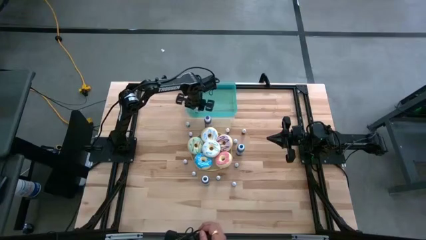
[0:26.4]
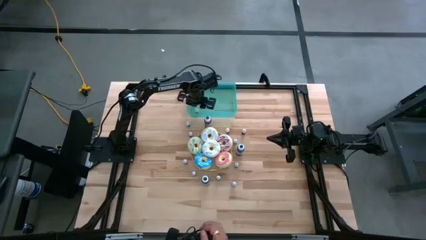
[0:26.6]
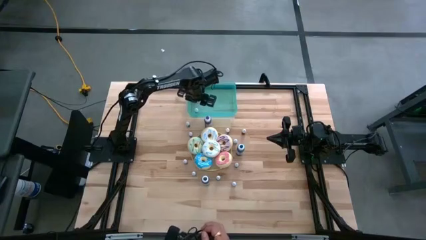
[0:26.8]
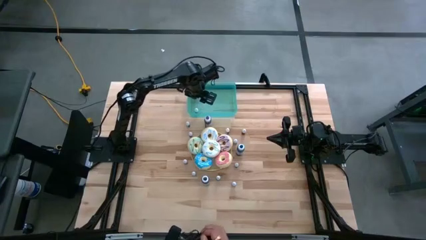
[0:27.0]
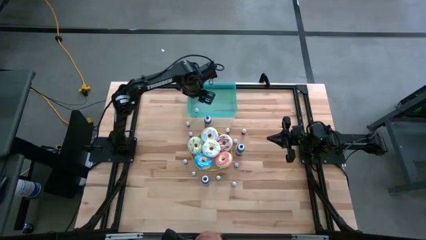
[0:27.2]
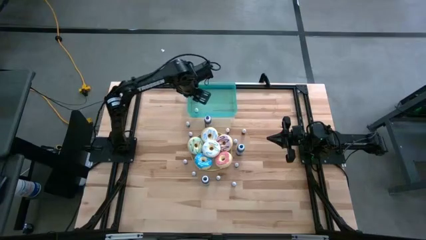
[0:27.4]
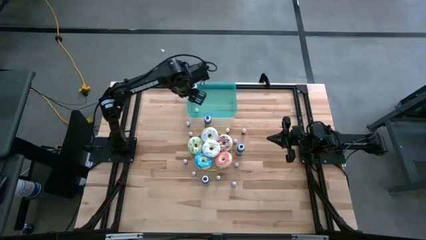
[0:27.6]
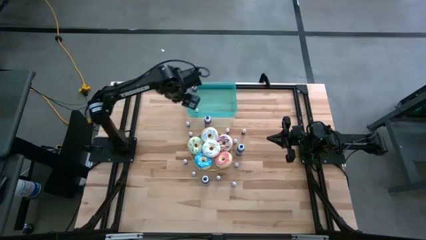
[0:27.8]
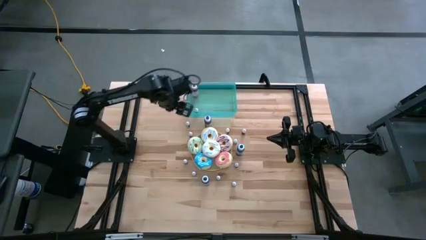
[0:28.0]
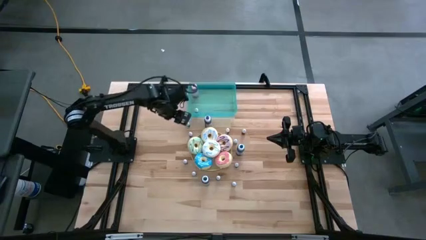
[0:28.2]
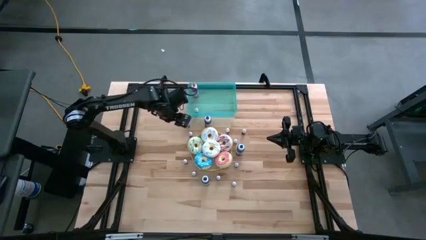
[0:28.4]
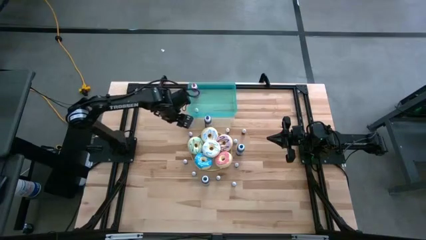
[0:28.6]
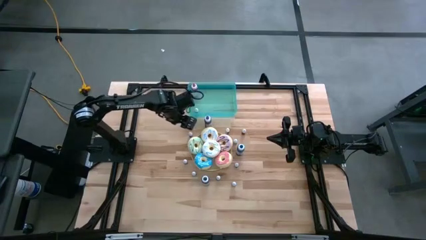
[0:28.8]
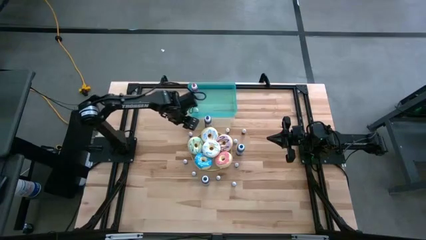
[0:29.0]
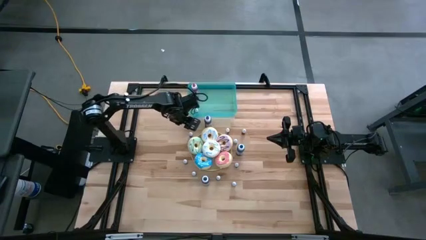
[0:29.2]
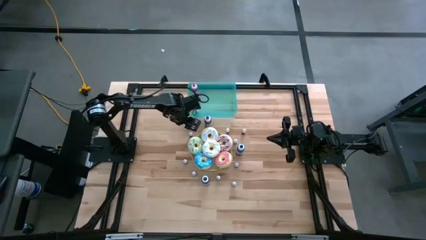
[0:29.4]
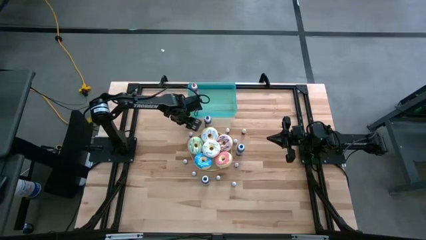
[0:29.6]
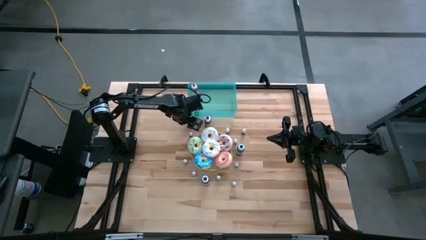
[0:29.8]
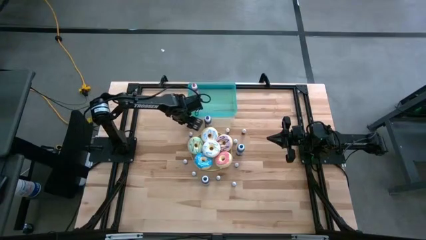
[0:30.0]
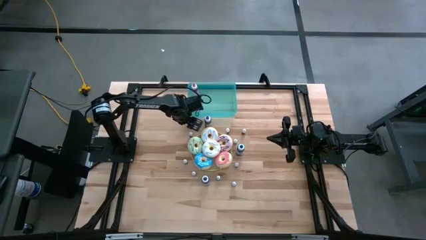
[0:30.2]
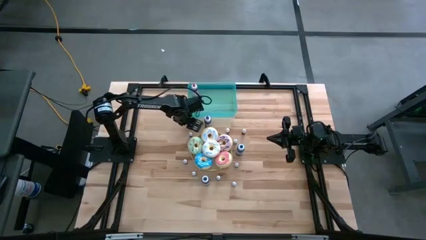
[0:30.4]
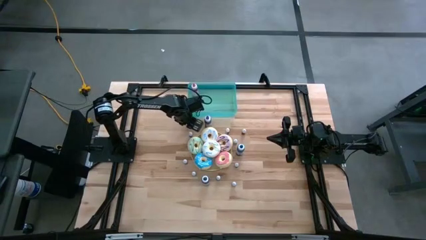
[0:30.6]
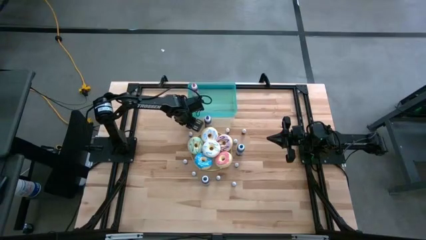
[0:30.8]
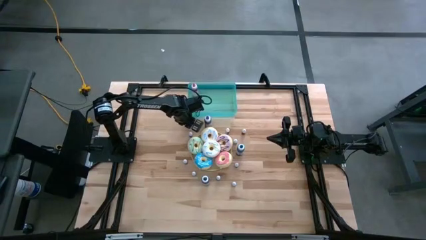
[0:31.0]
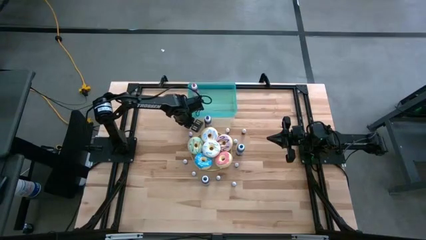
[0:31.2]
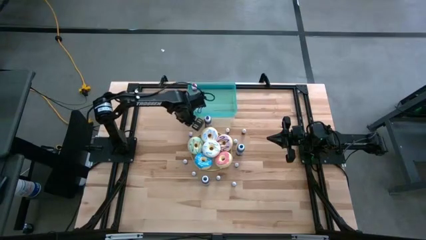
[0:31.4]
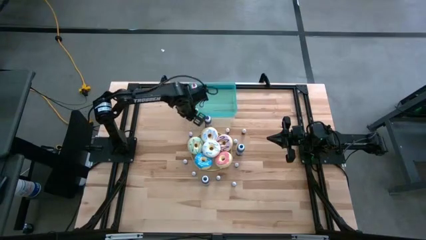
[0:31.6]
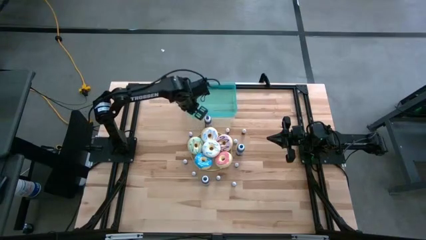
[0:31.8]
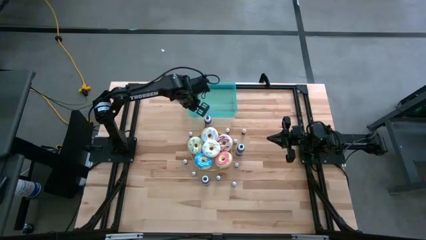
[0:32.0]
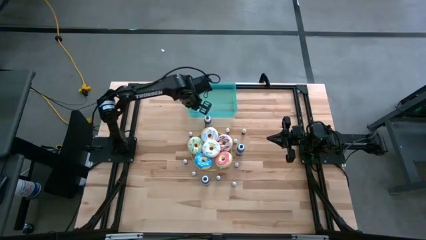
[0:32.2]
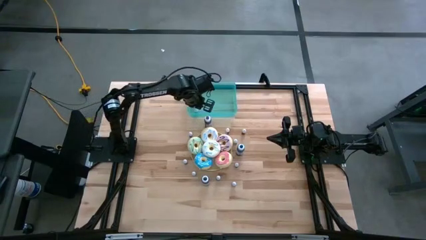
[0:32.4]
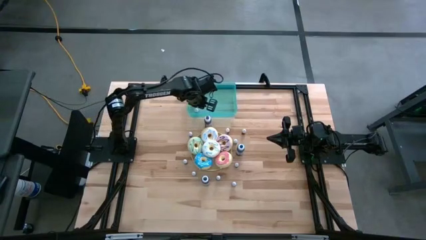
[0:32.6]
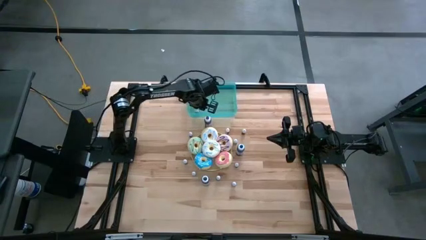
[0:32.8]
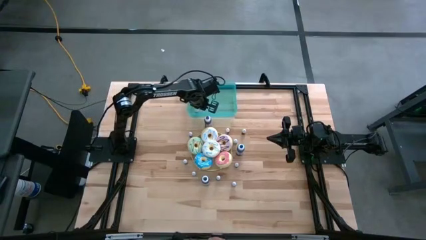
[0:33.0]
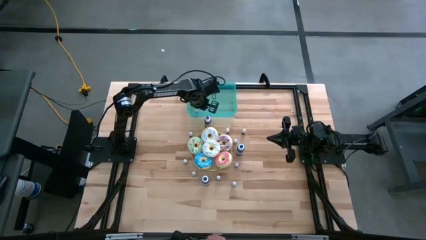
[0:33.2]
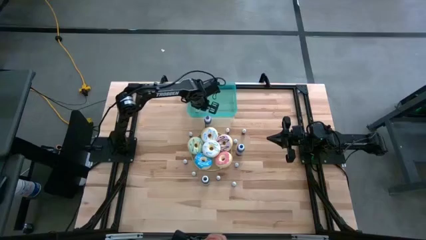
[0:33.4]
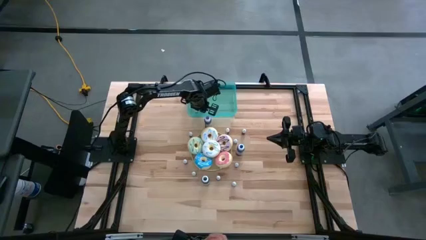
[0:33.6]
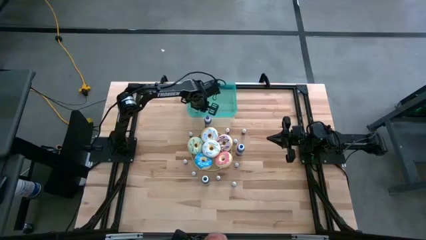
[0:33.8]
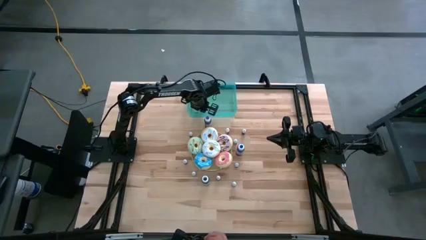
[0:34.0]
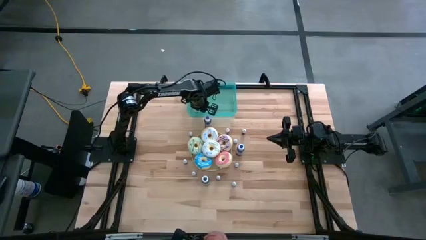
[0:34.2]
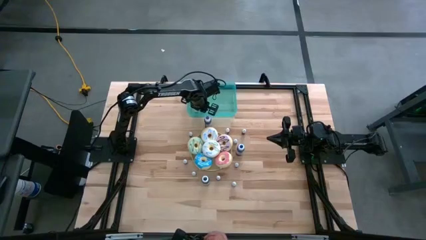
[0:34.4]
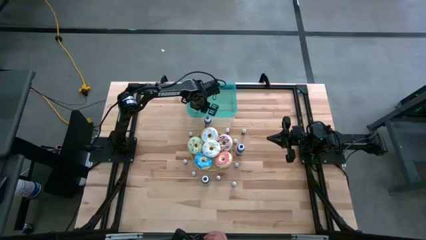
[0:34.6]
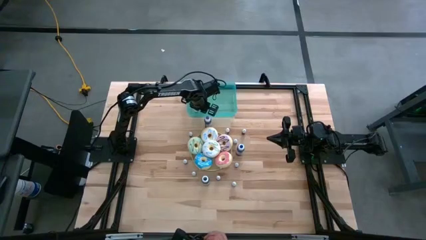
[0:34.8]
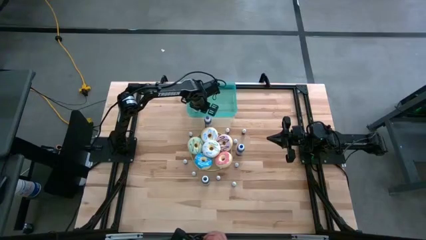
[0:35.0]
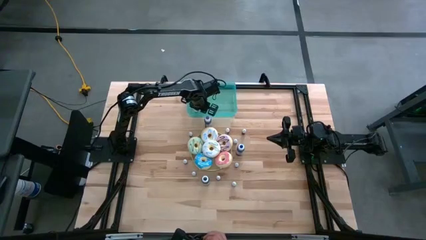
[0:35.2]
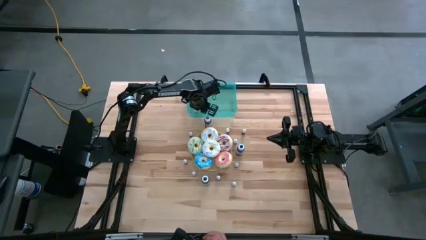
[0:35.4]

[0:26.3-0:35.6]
Task: Pick & Place food coloring
Put the small black food coloring bottle into the green container

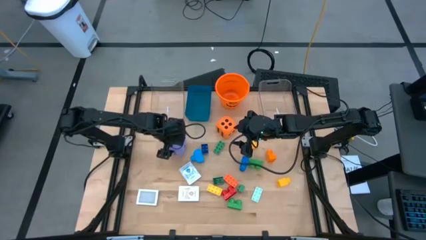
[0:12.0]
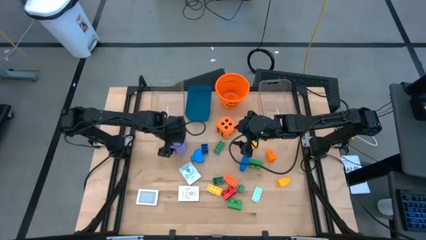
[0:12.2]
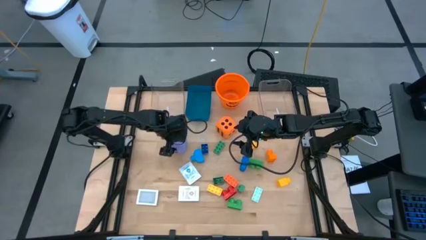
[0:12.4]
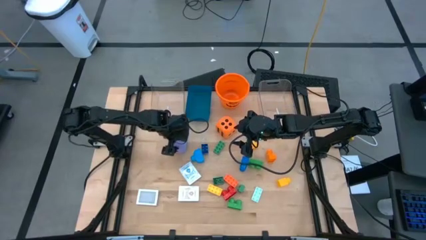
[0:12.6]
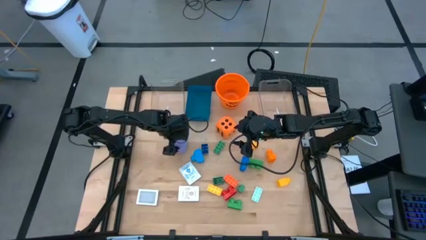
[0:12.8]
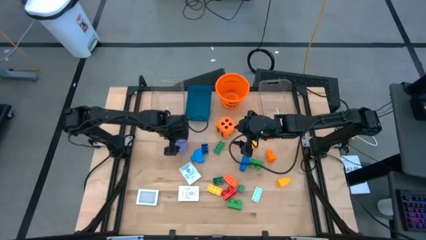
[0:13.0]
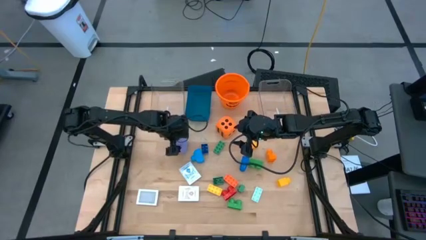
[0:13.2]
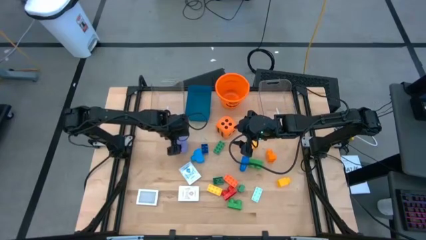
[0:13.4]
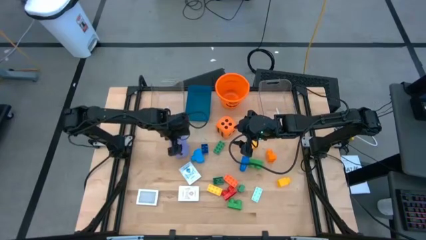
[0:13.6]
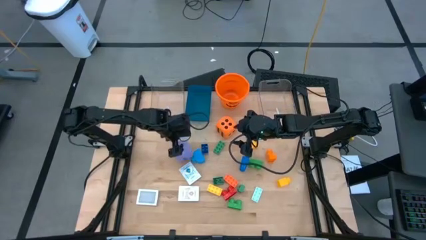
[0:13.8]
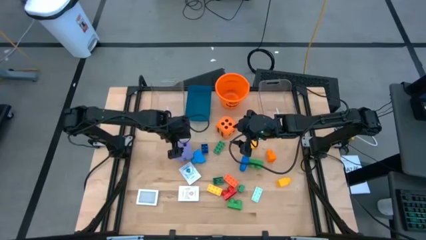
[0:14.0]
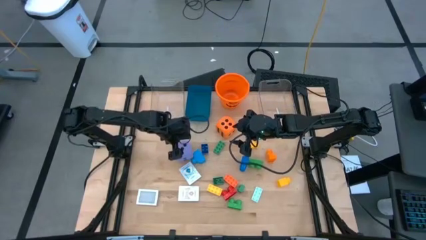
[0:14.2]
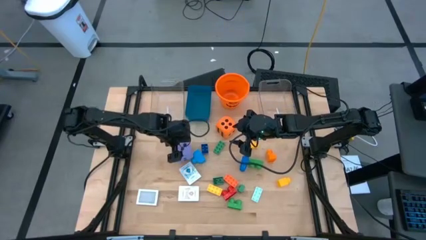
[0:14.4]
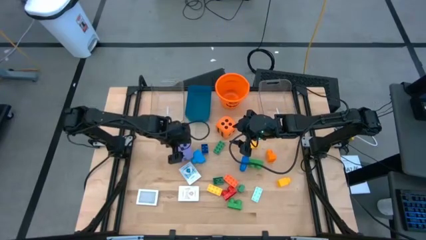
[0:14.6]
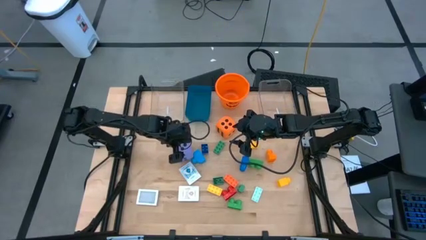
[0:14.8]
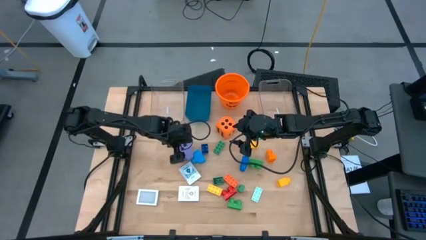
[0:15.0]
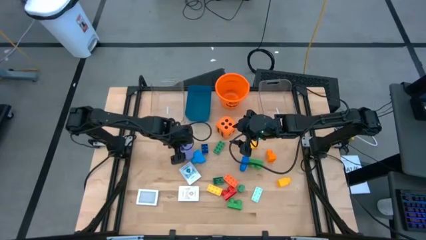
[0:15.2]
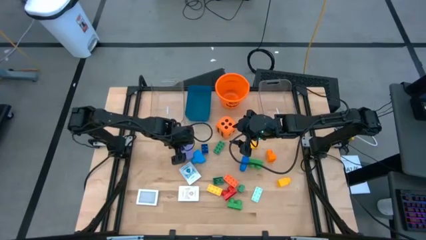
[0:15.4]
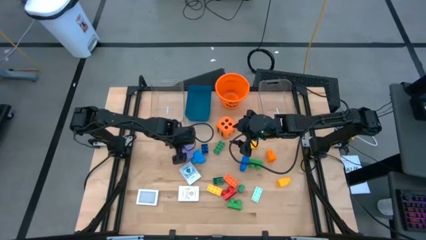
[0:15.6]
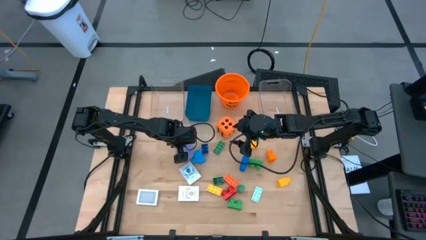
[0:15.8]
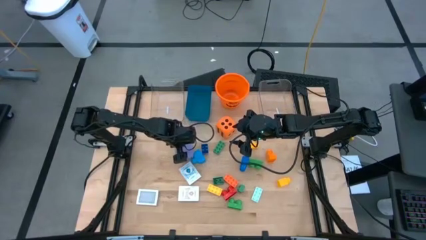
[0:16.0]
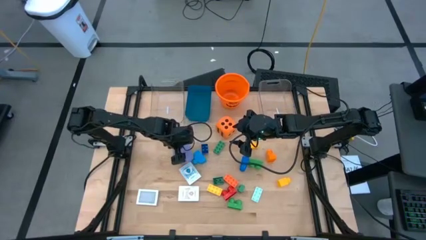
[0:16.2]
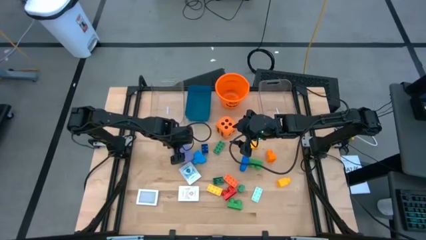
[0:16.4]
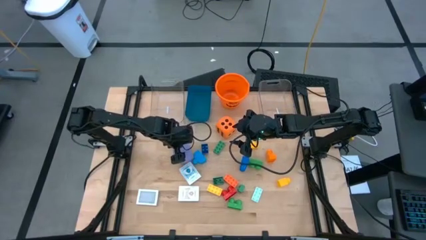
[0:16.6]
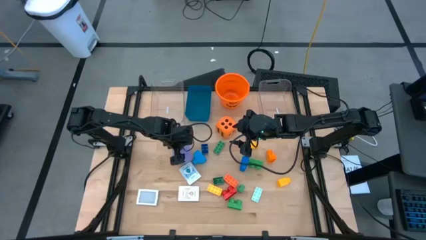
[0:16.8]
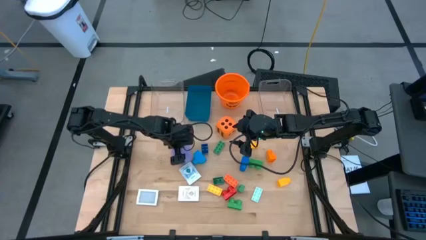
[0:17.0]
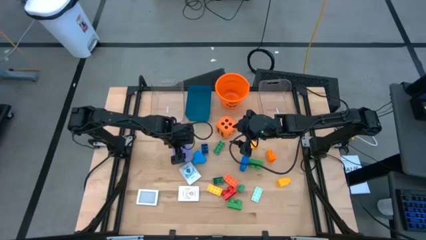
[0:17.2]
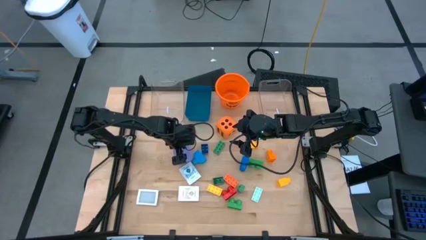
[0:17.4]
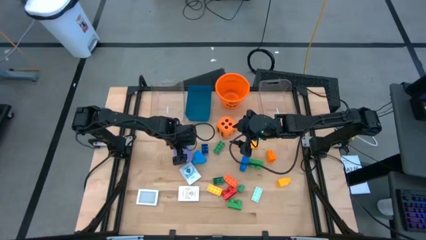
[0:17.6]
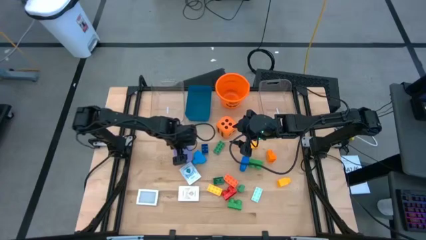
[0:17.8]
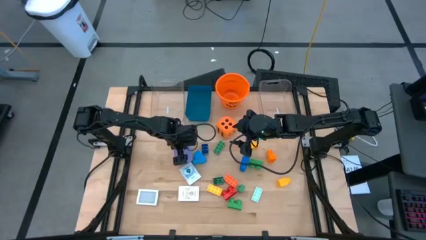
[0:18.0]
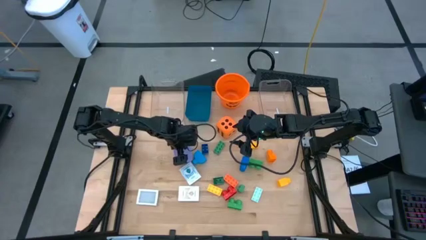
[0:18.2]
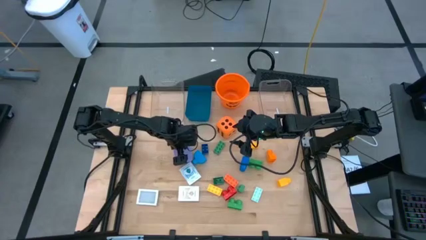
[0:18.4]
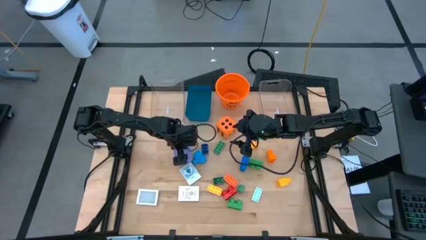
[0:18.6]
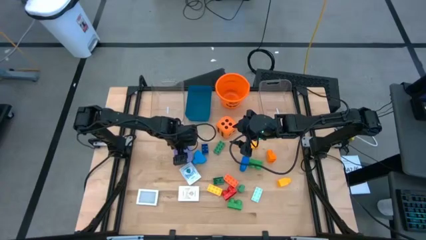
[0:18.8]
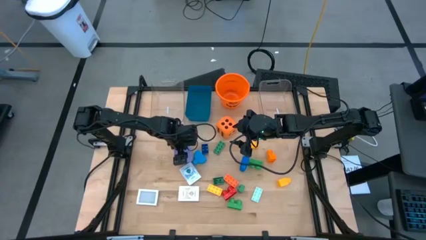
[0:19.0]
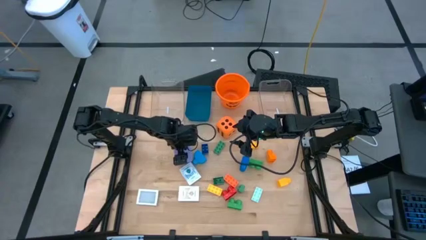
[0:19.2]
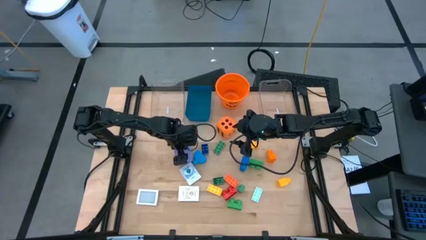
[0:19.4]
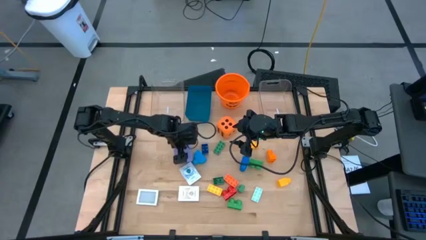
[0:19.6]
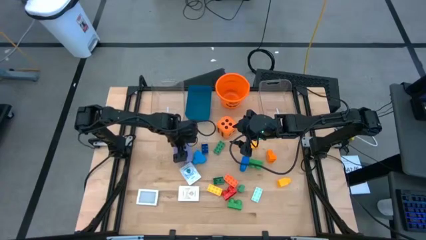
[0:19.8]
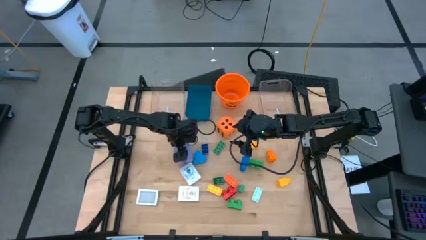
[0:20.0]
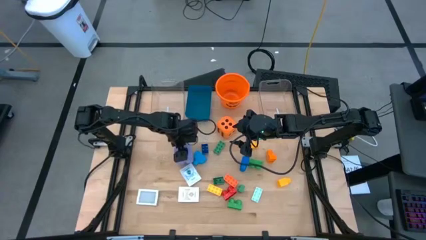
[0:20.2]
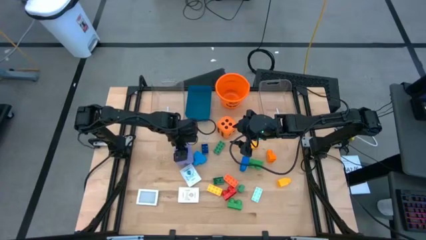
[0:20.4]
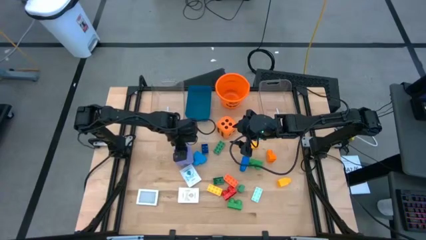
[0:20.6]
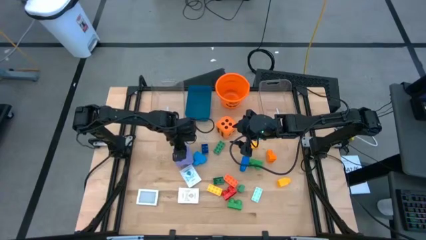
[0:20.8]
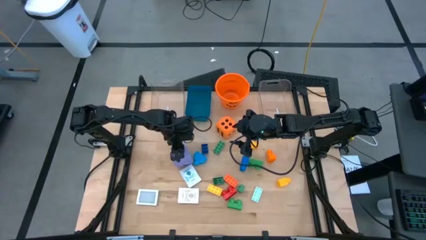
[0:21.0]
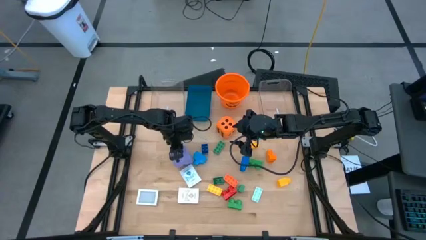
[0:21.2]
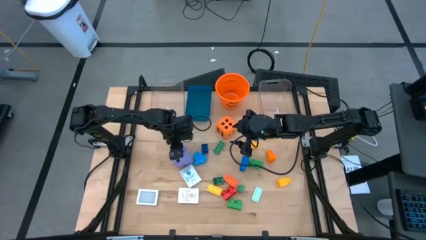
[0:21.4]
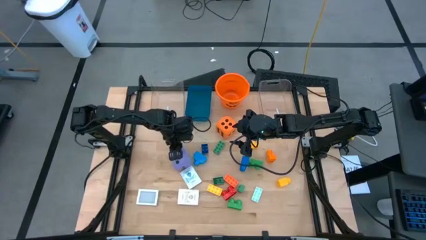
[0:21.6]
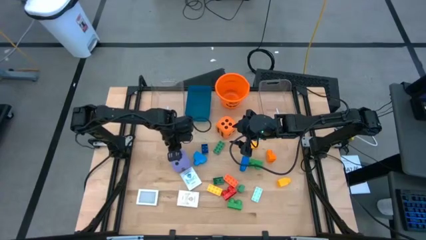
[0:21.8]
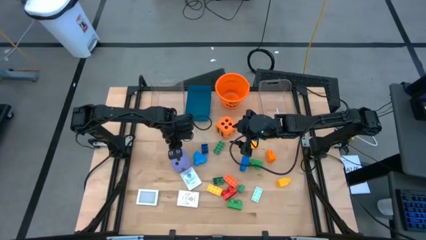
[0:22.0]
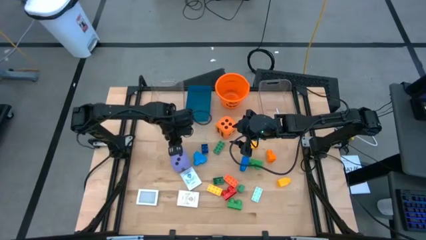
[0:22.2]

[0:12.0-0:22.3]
Task: Pick & Place Toys
Put the violet dice into the left transparent bin
